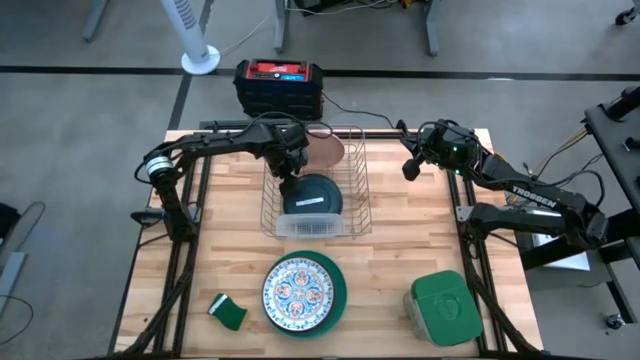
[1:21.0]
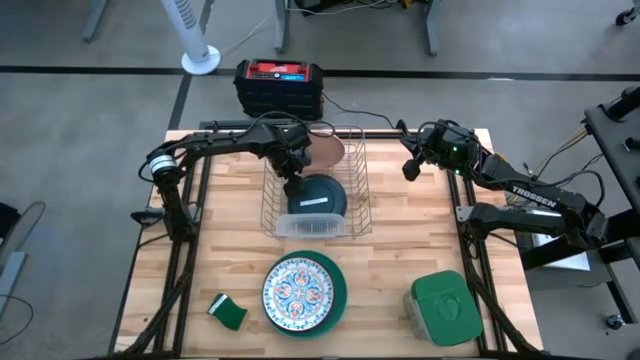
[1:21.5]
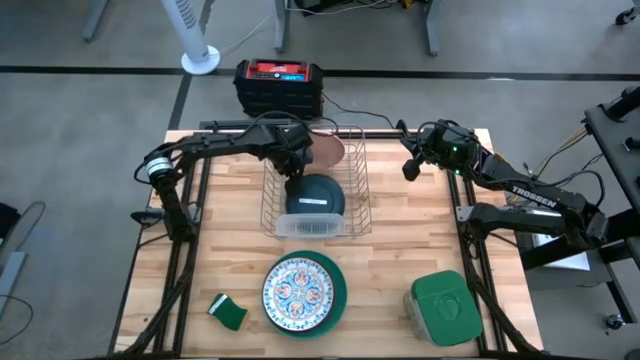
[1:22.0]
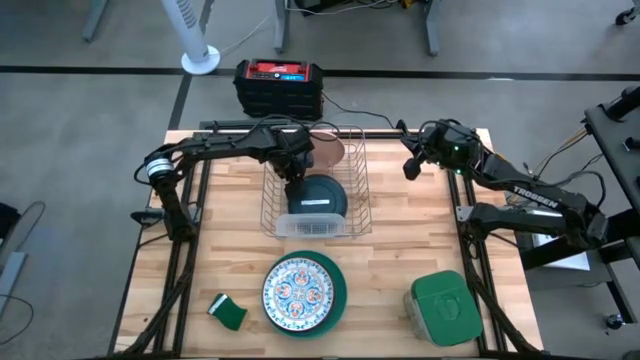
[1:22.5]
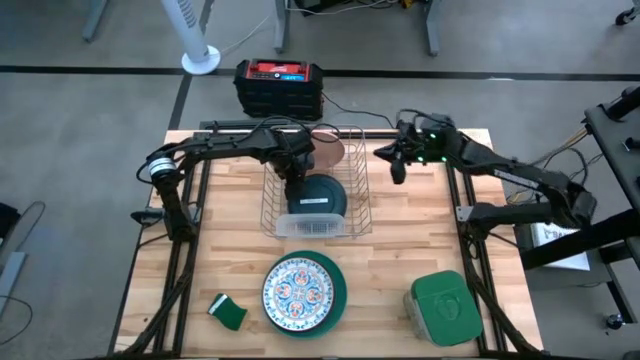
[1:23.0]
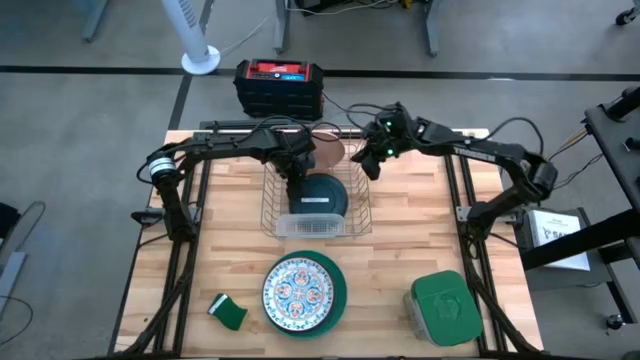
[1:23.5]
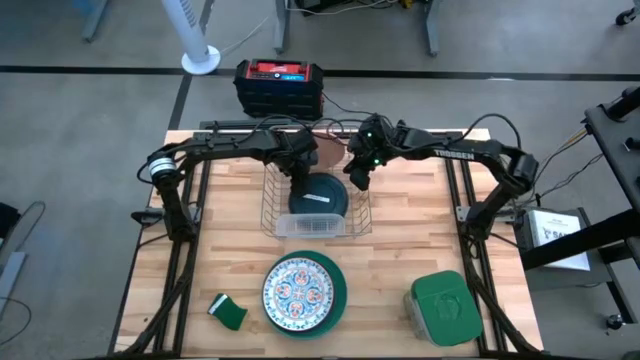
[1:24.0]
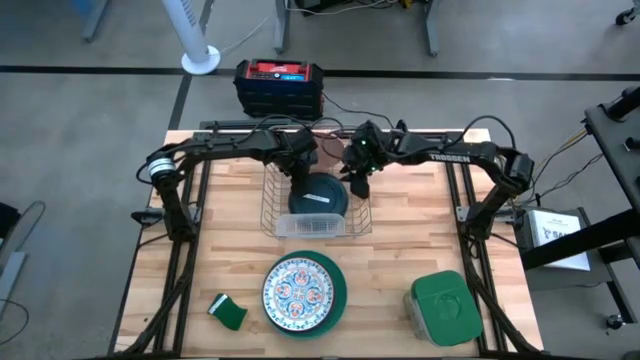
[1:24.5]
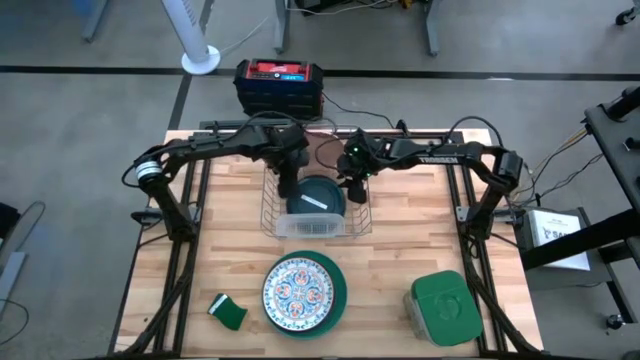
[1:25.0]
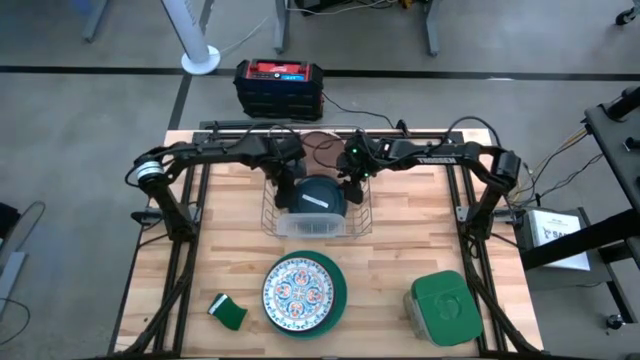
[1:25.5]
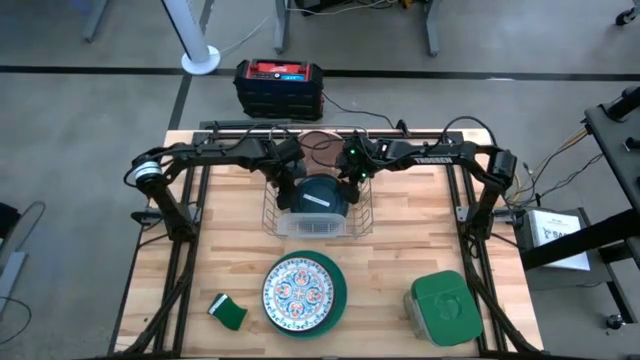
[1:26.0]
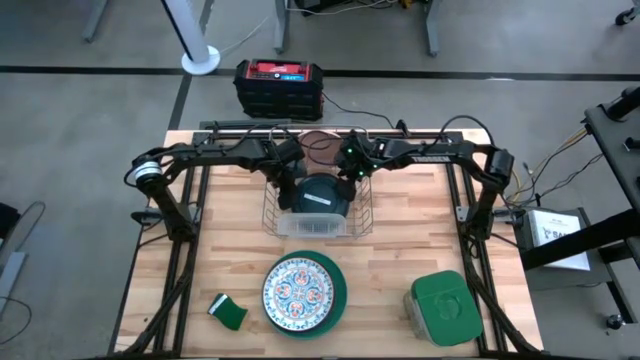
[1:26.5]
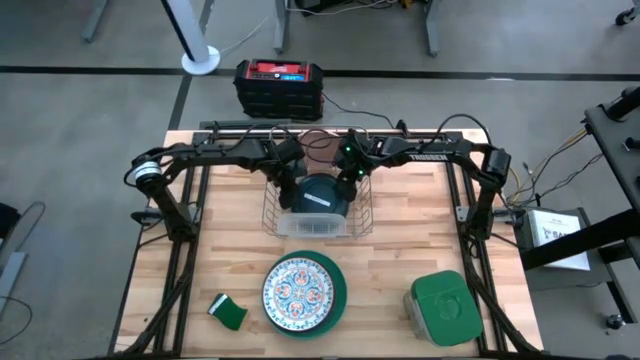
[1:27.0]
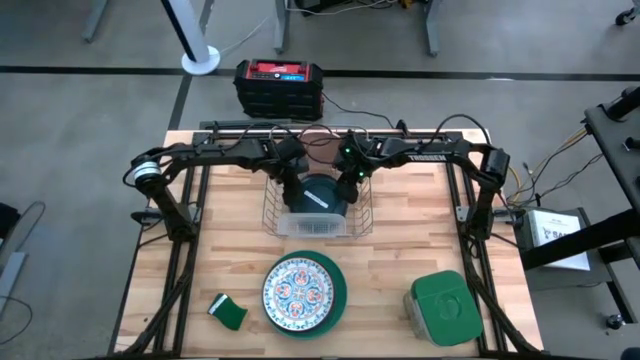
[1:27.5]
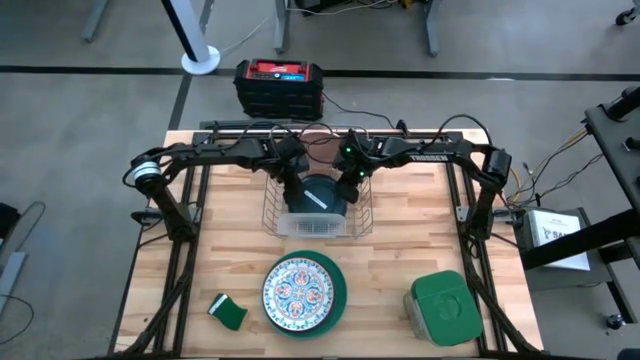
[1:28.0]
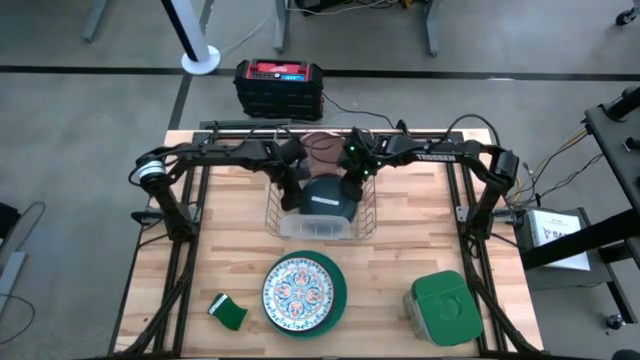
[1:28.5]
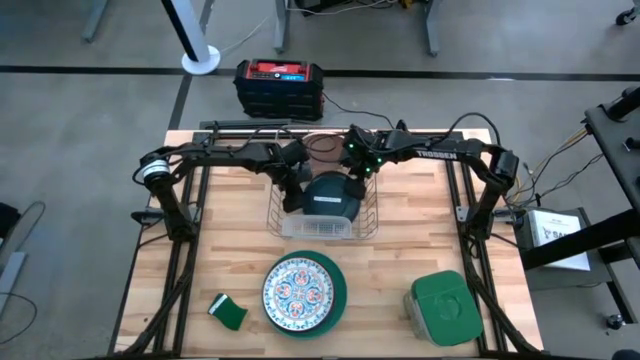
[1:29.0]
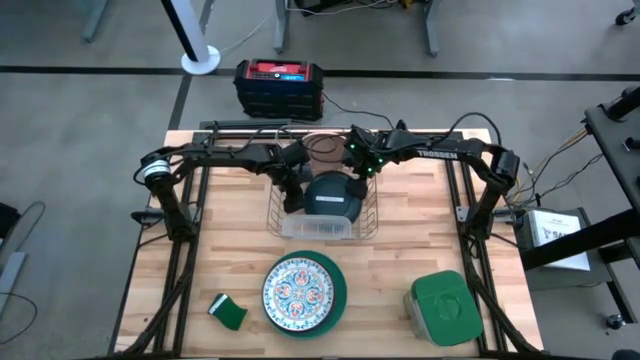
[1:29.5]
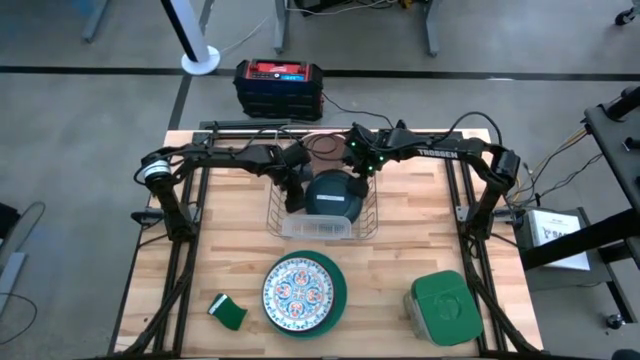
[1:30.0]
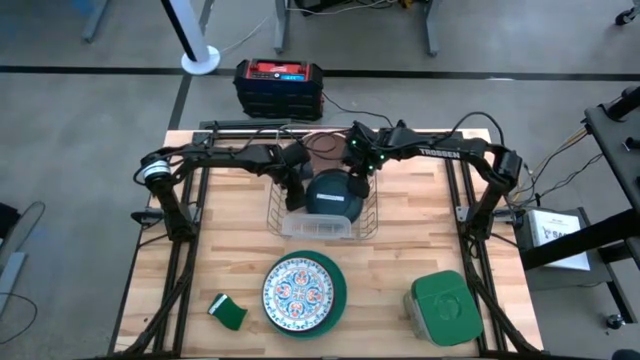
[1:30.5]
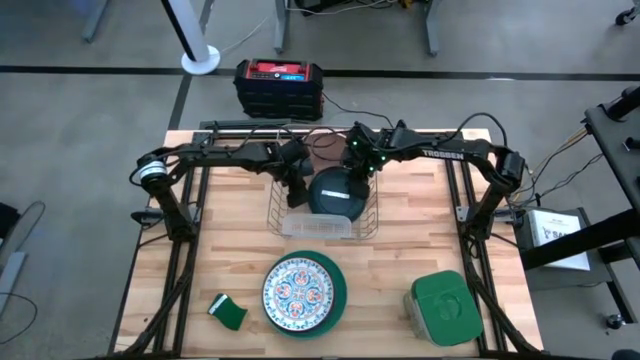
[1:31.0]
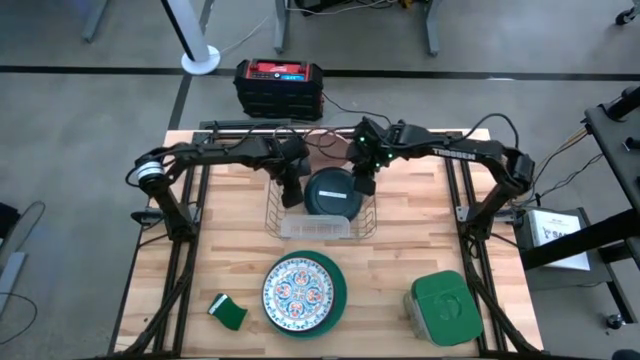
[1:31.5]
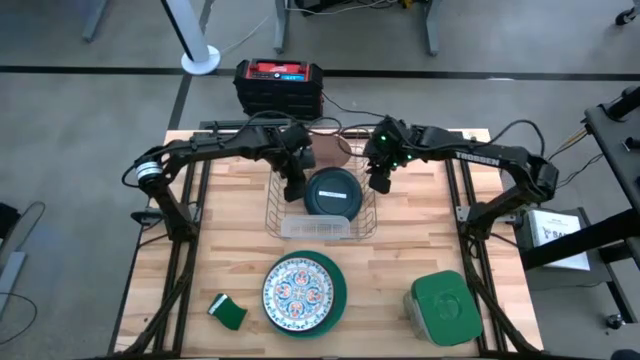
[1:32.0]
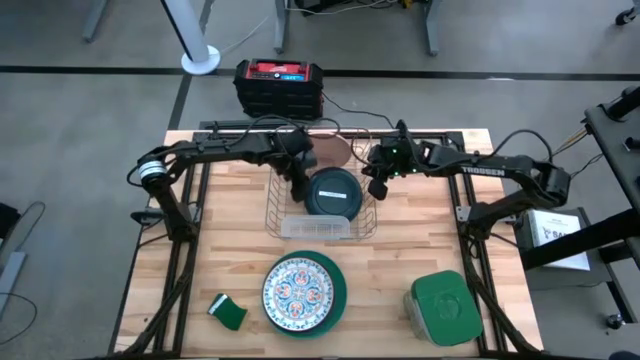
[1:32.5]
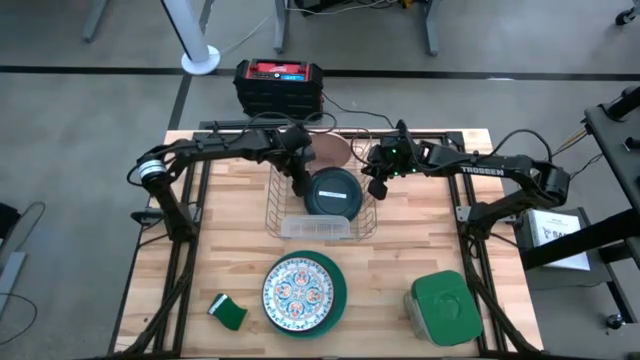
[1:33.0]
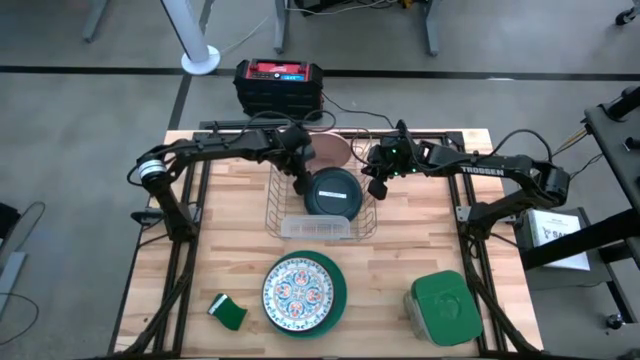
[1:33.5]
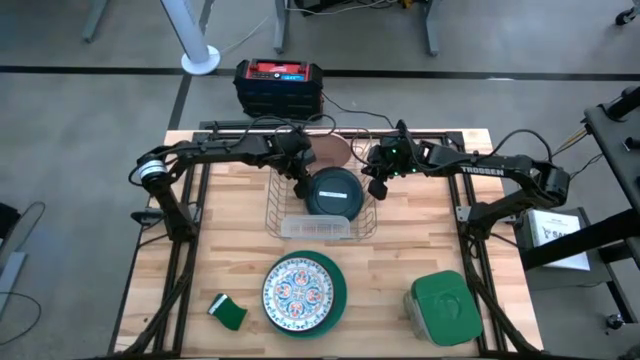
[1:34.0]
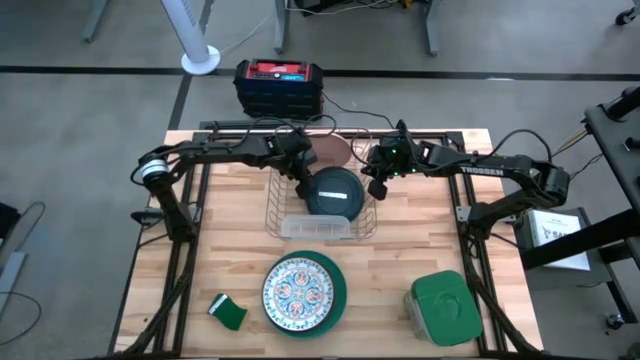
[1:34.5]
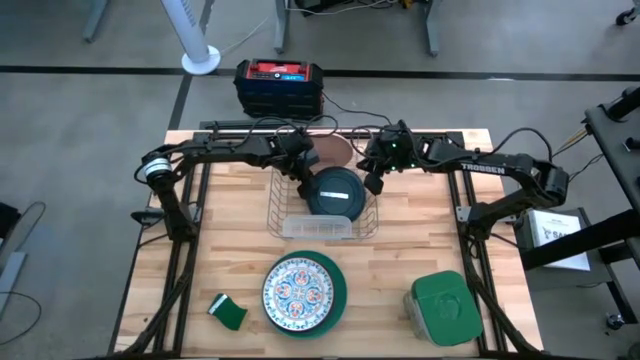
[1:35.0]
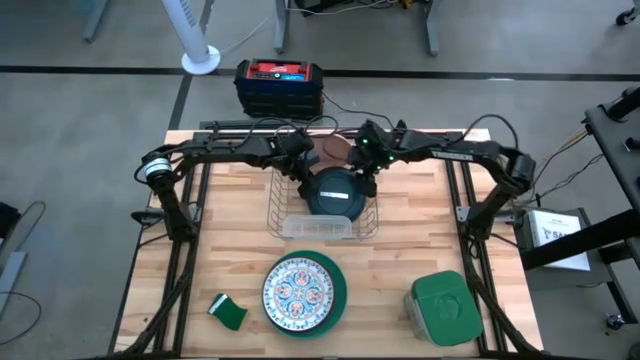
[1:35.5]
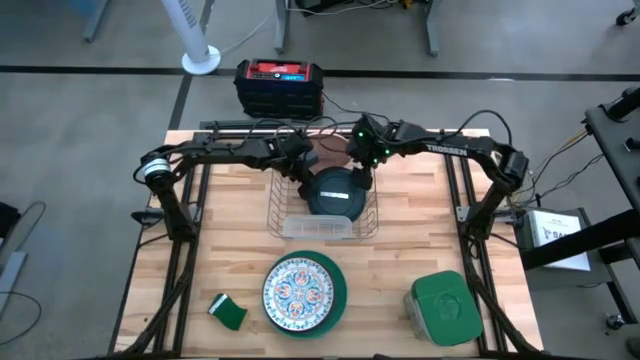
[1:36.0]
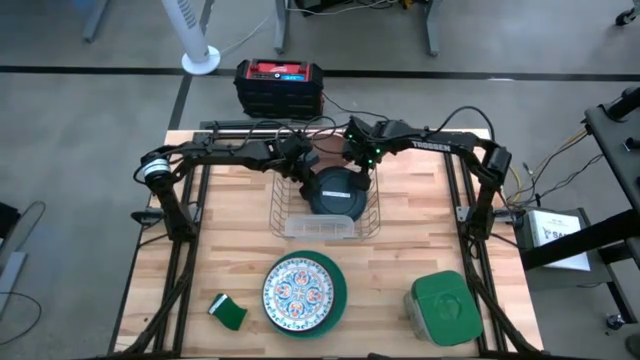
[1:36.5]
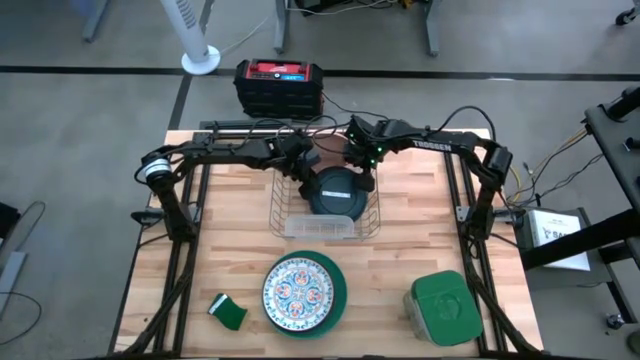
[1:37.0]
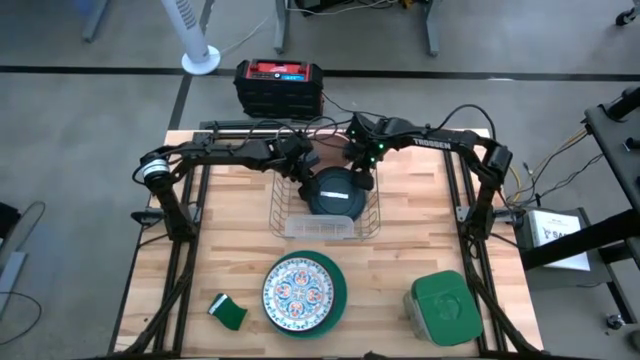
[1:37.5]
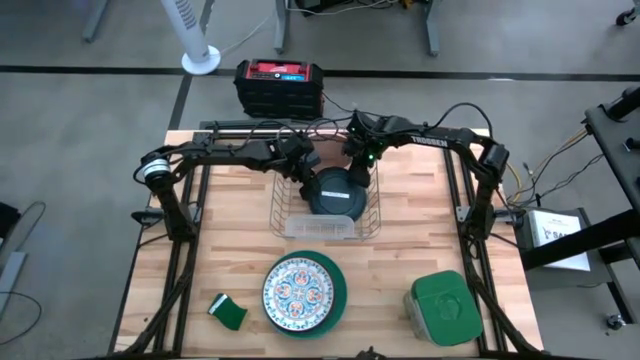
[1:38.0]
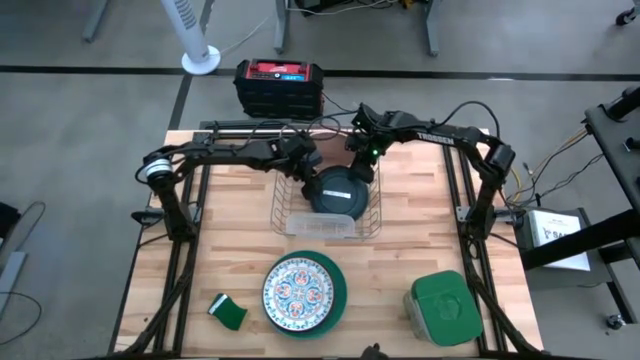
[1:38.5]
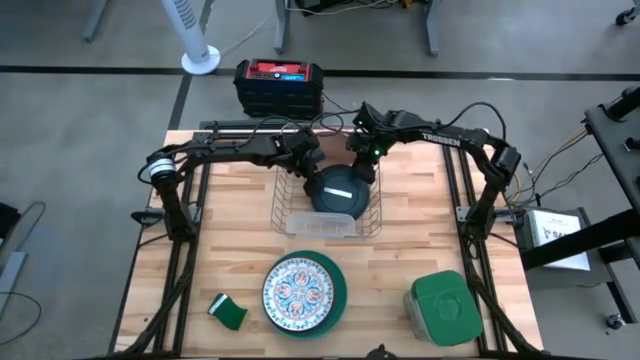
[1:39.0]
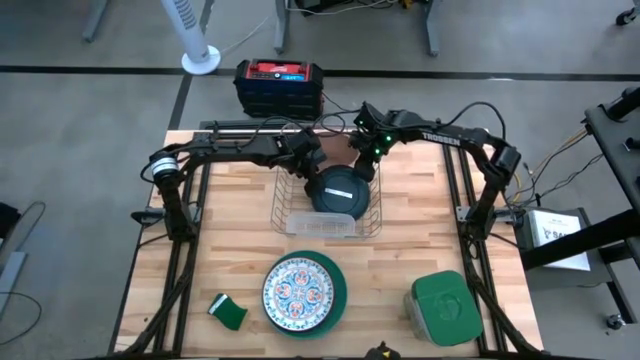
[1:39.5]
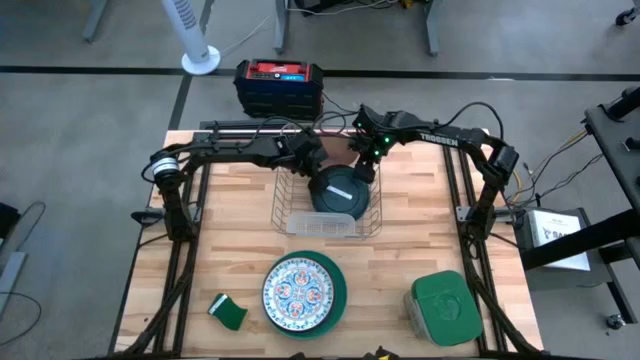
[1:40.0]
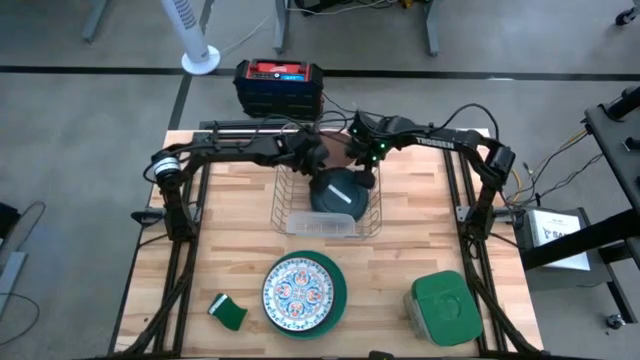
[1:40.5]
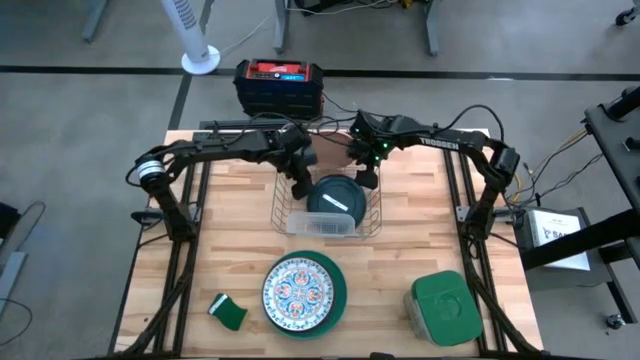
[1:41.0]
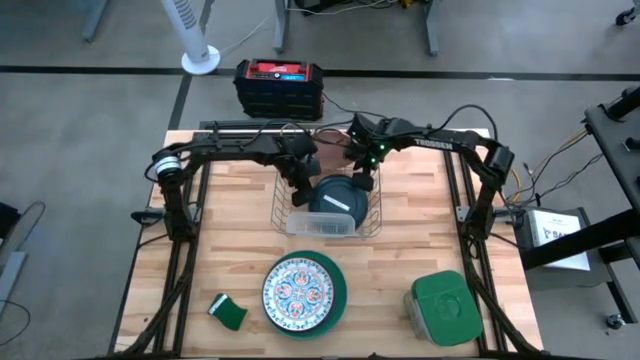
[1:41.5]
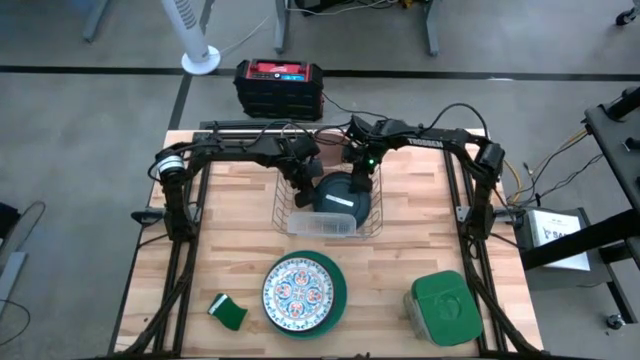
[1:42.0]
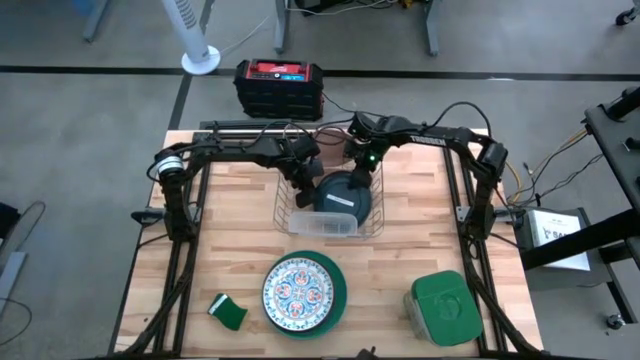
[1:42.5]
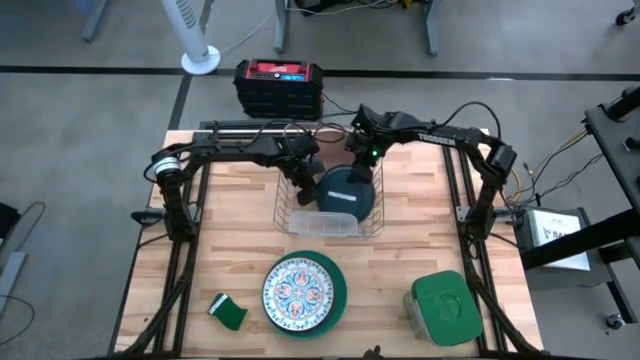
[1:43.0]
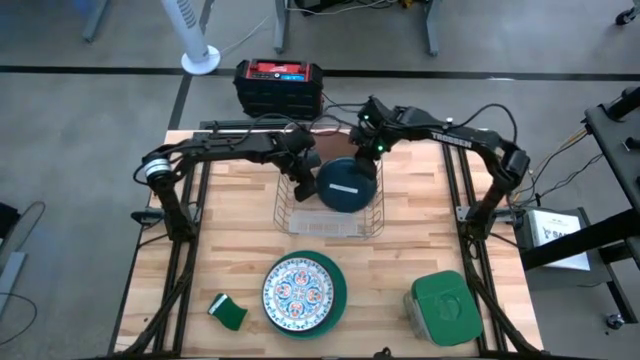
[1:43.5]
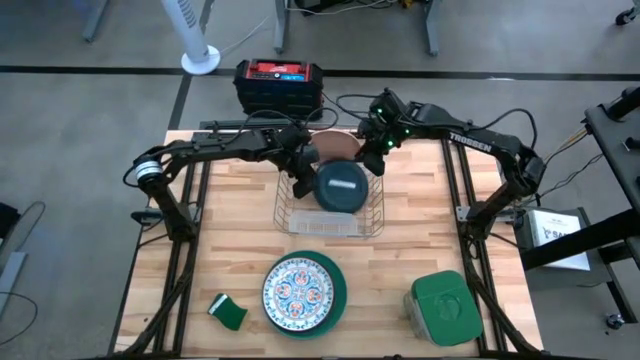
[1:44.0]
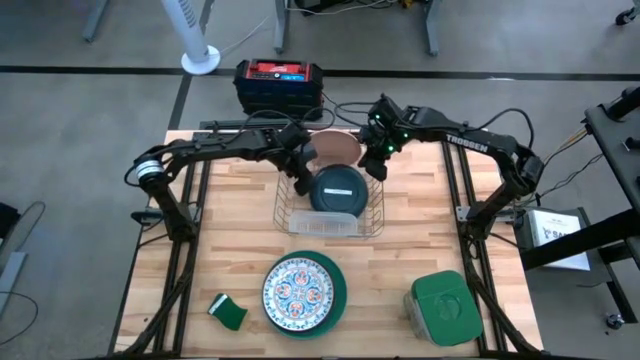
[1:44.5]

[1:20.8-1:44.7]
Task: Sort dishes
Put the dark green plate in the dishwasher rack
